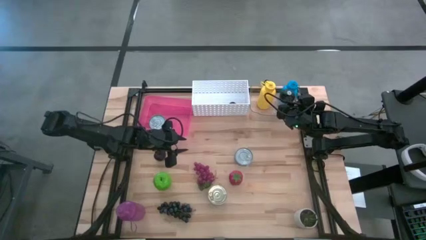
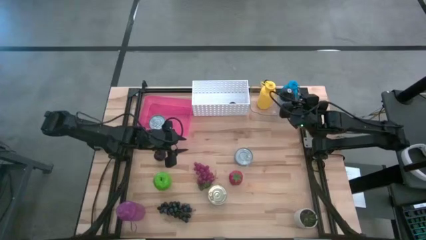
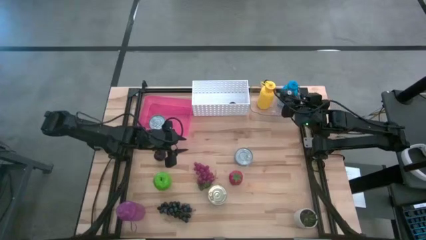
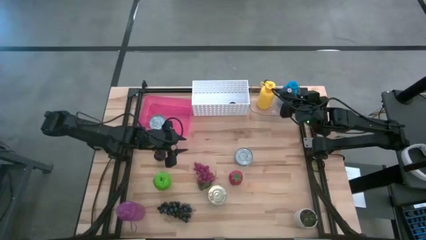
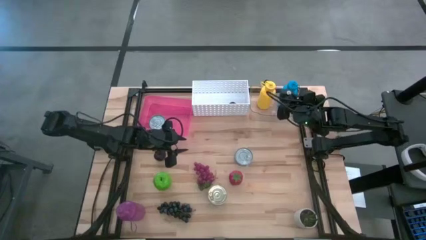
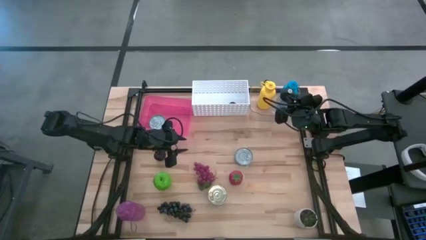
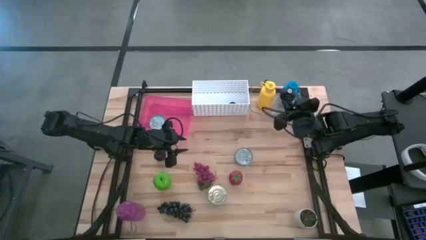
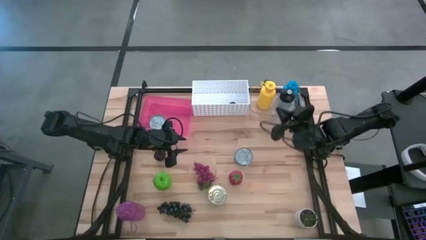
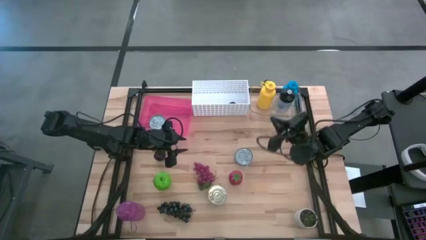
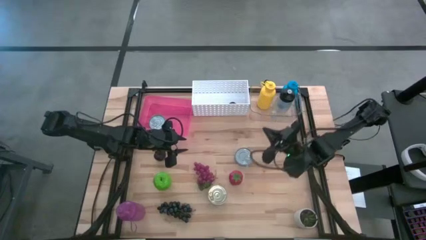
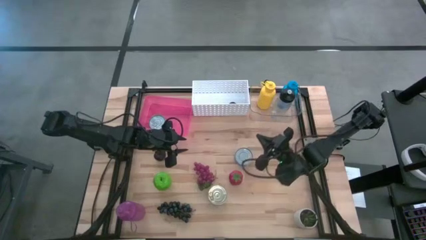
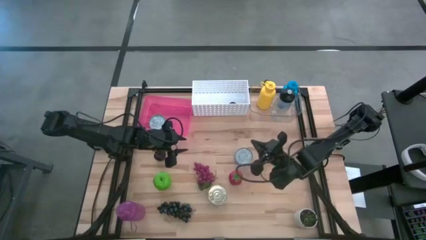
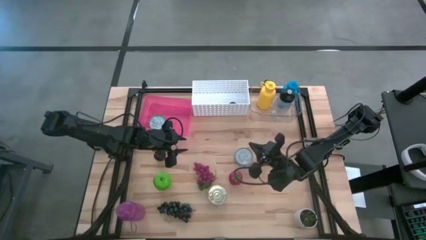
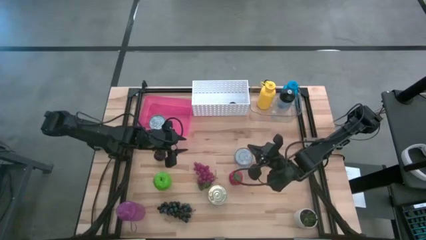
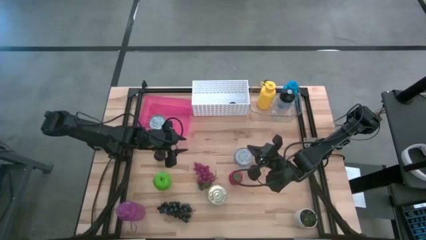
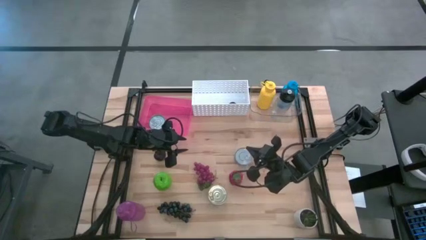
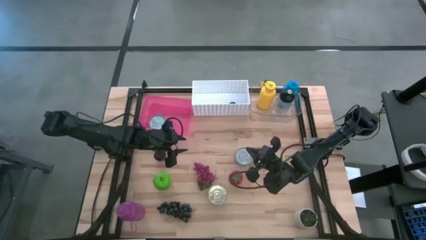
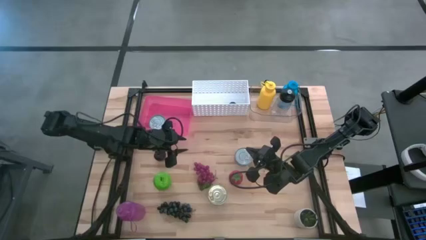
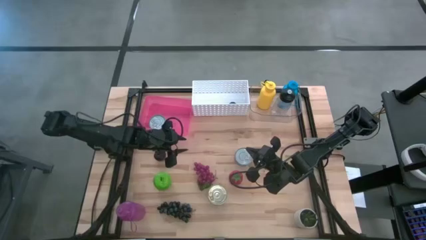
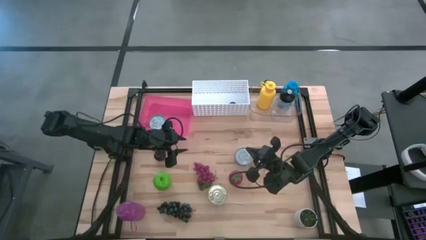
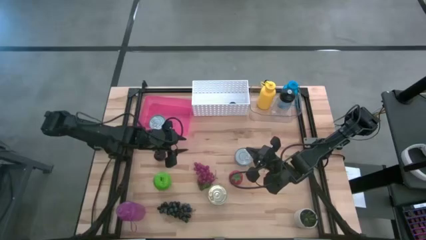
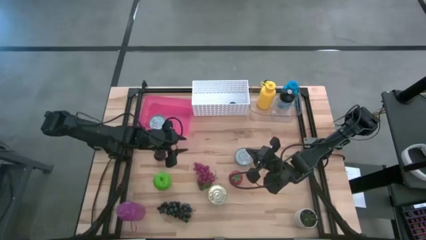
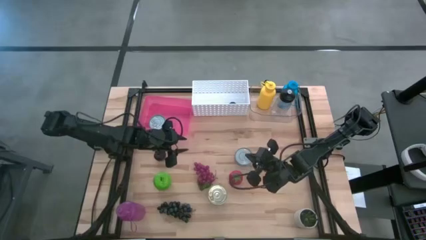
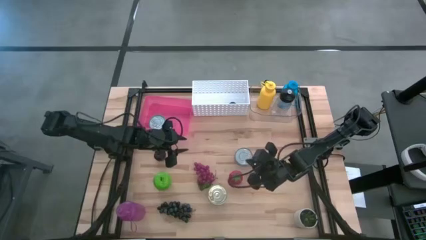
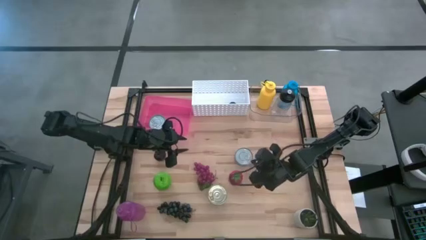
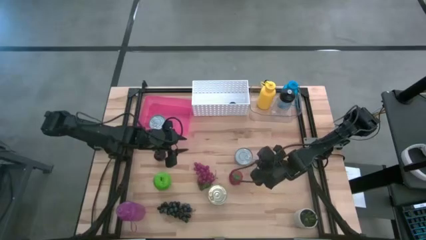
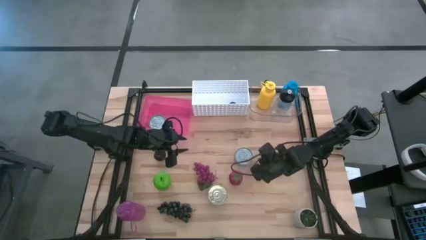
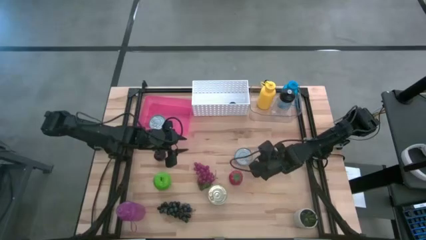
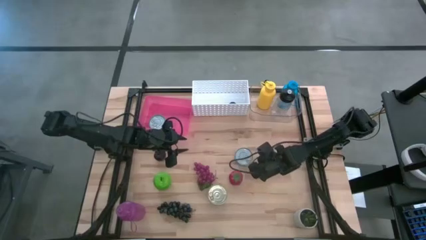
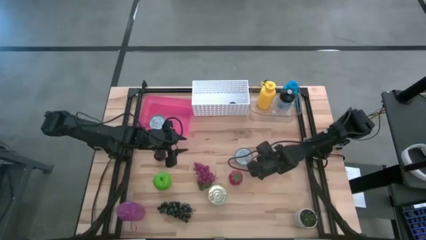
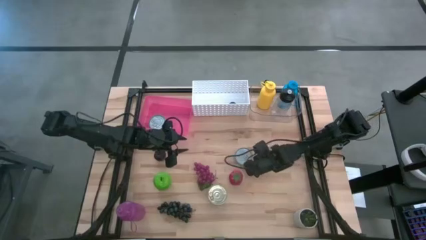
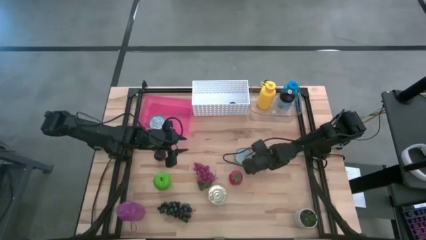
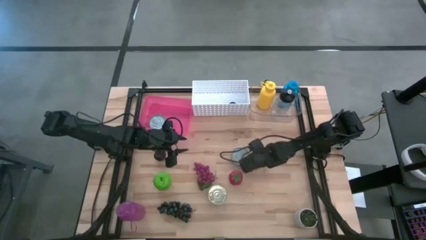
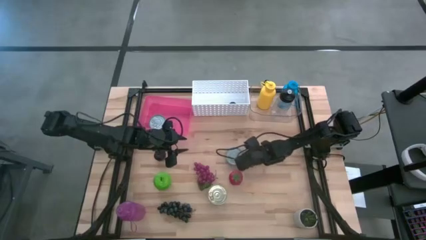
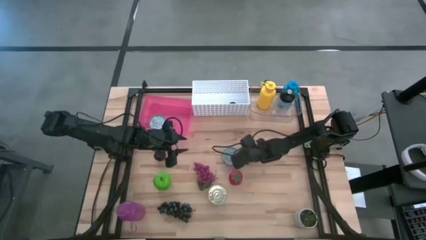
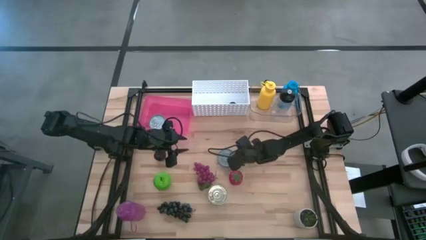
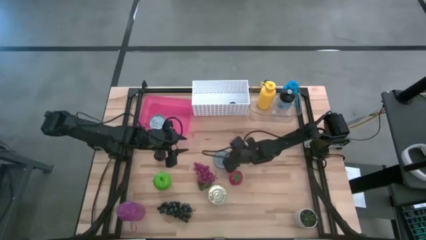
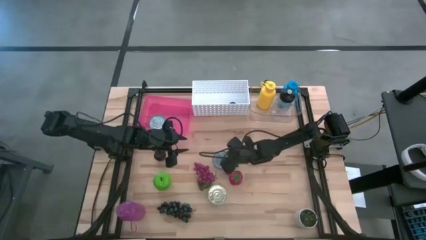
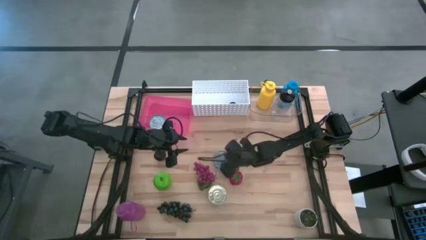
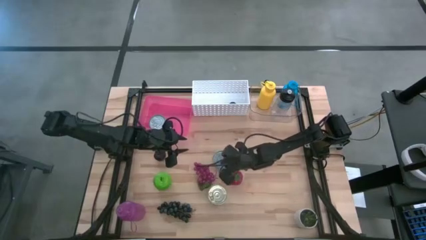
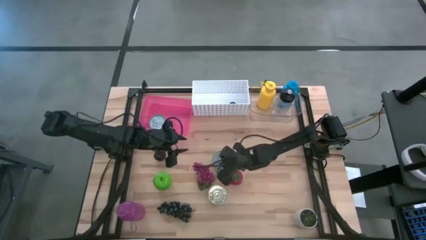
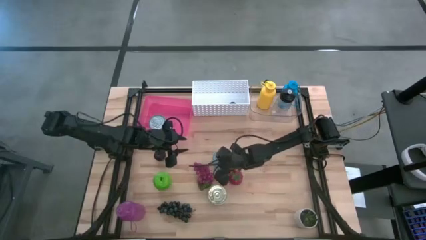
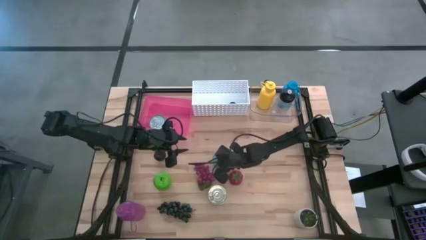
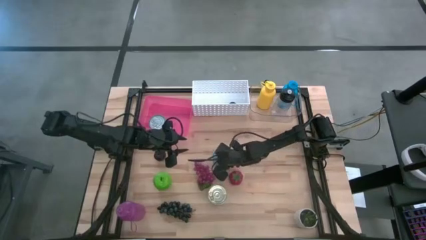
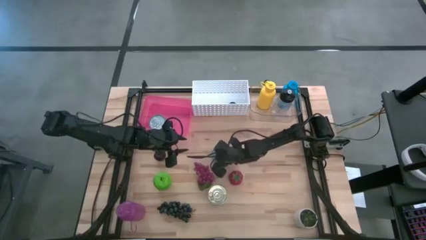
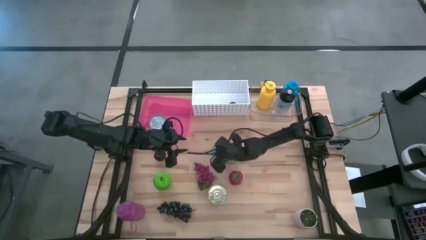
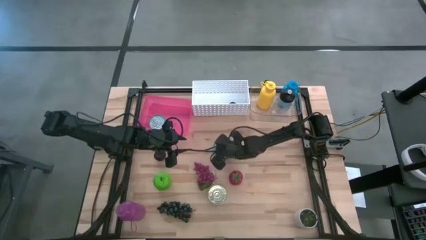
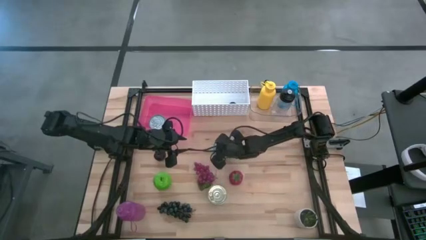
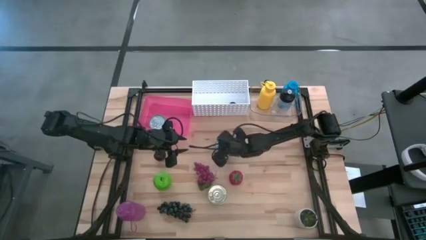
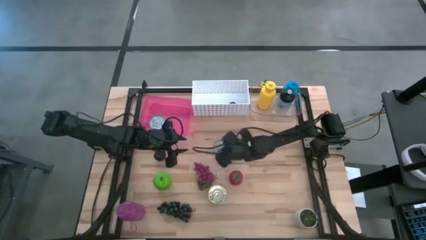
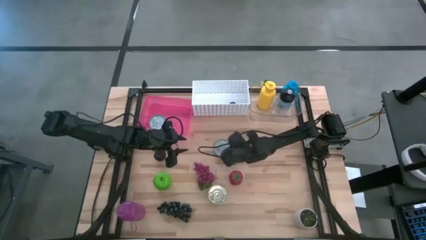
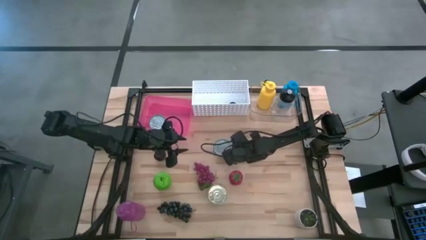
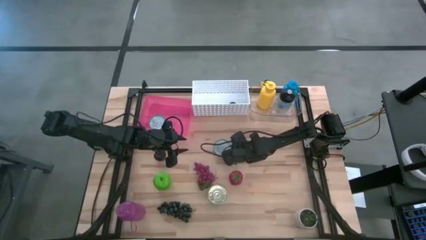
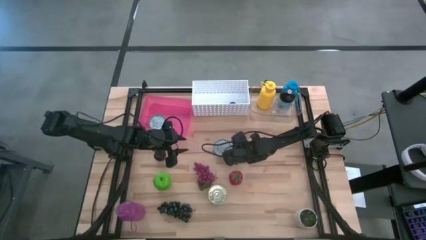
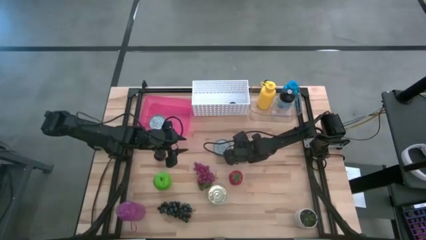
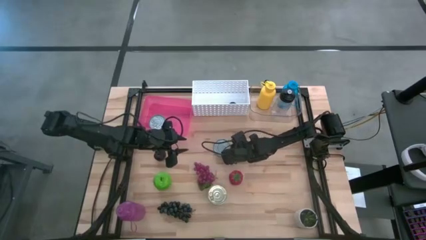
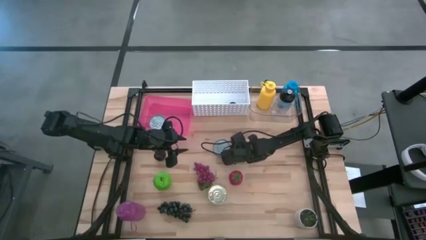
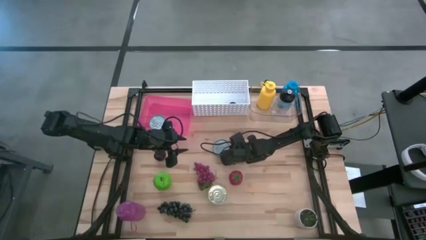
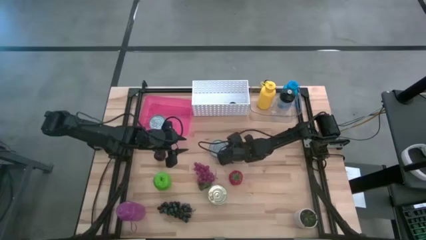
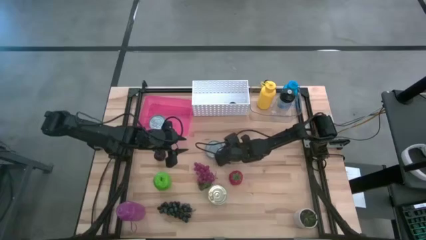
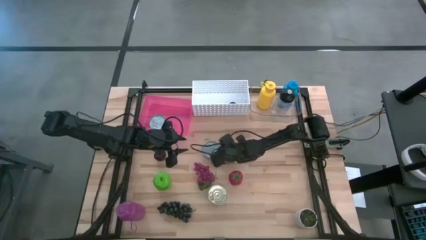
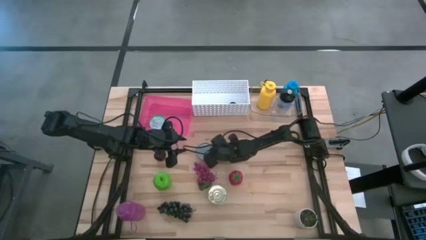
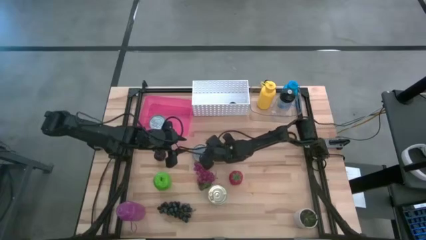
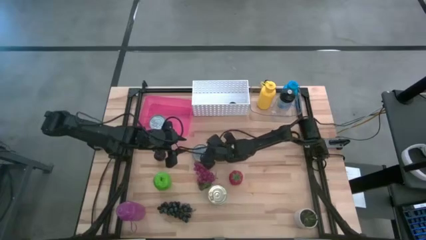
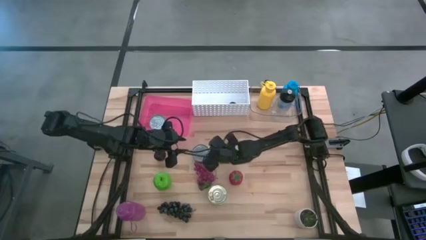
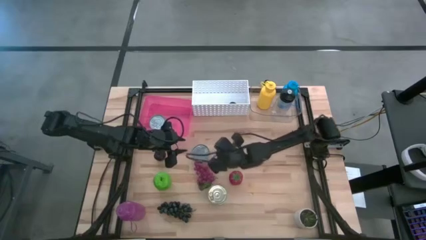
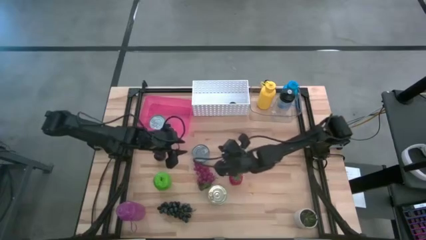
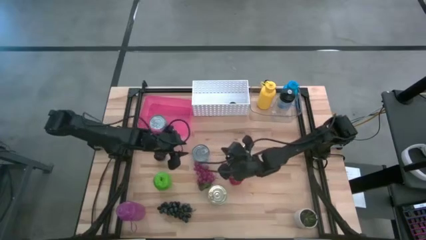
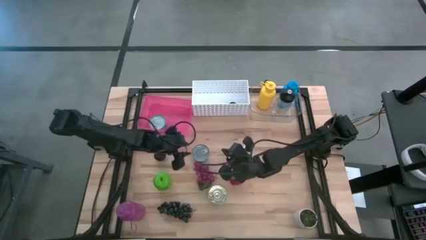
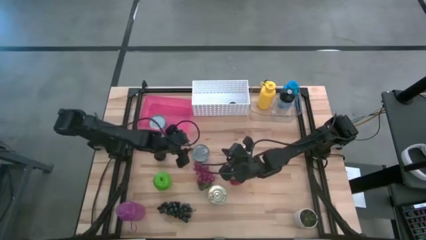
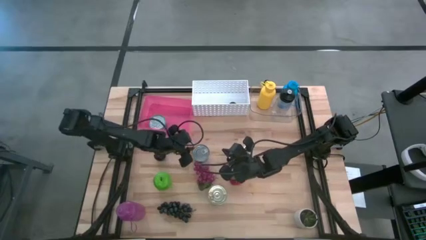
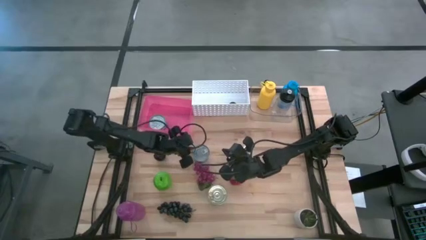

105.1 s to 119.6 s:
Task: Pick & Place Food Item
Put the blue tuna can into the pink bin

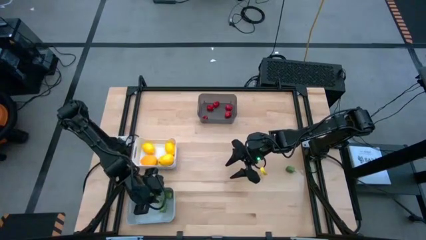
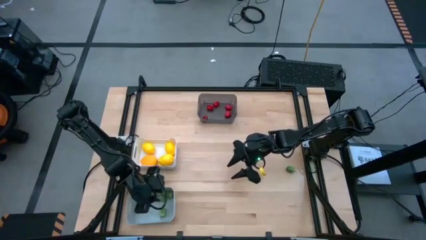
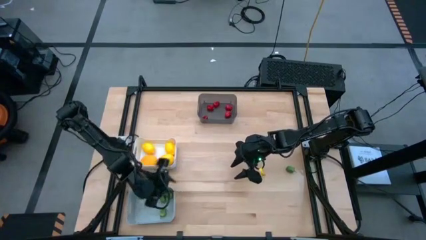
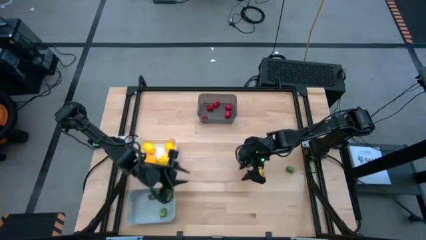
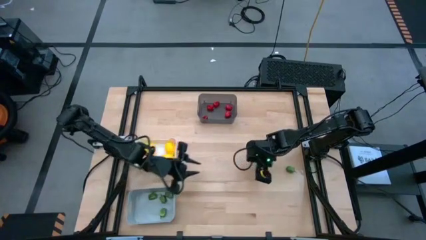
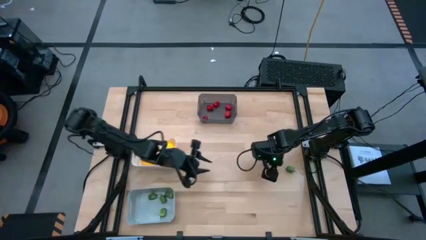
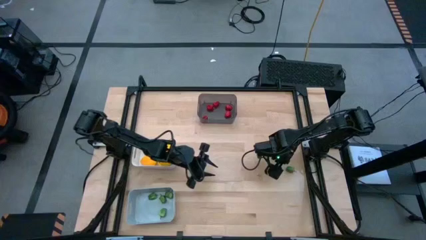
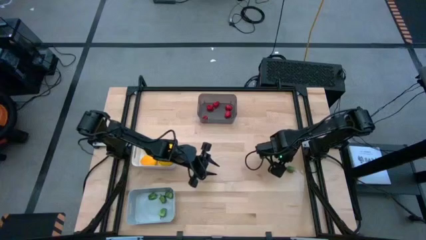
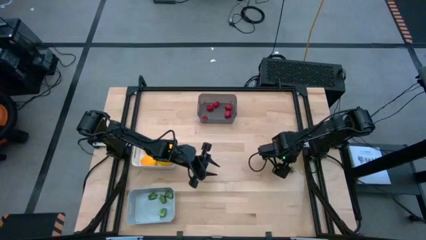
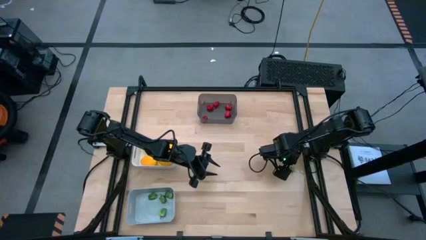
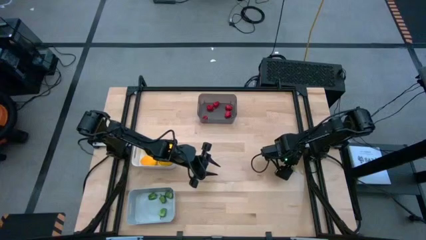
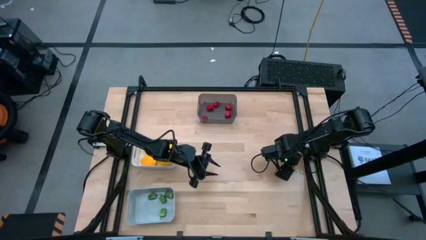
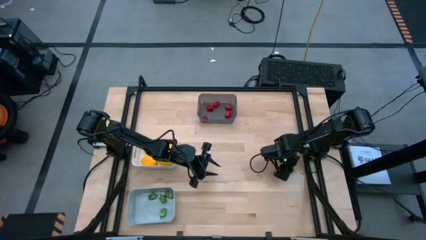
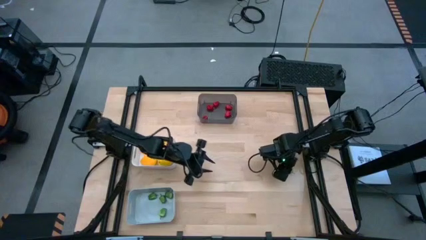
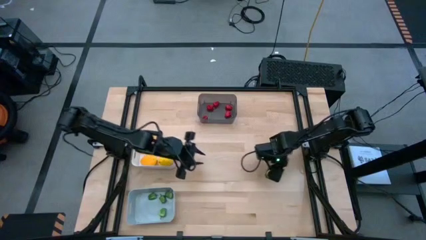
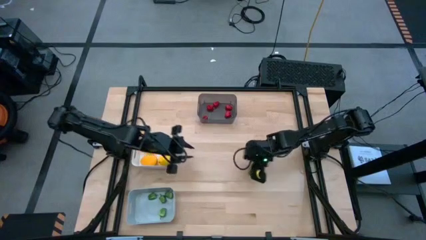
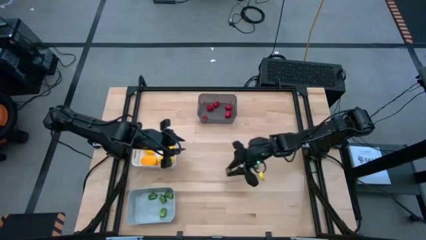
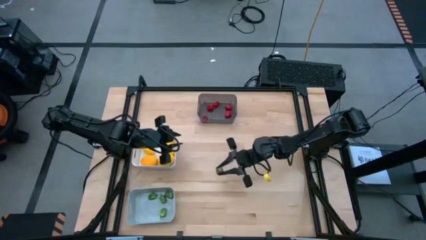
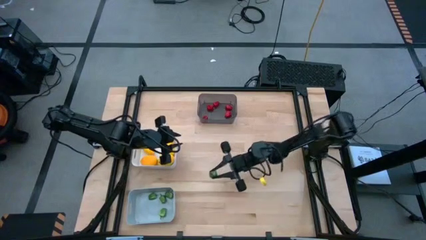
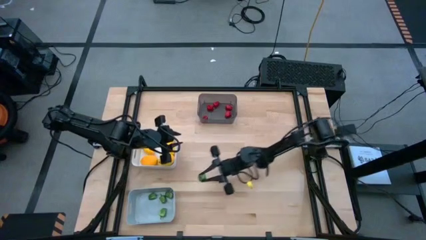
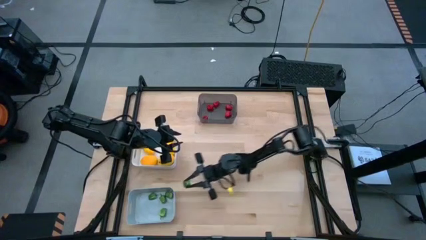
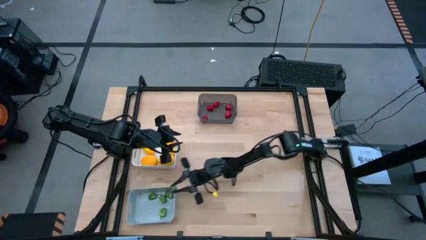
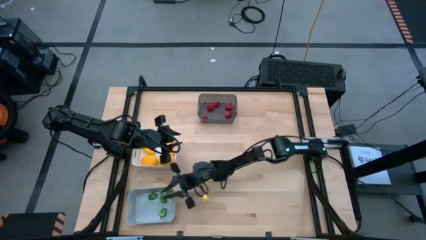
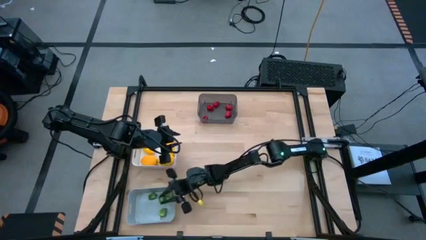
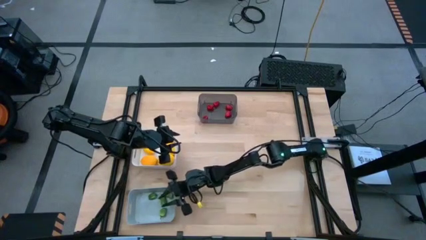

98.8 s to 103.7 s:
Task: Sort produce into baskets
Put the green chili pepper into the gray bin
